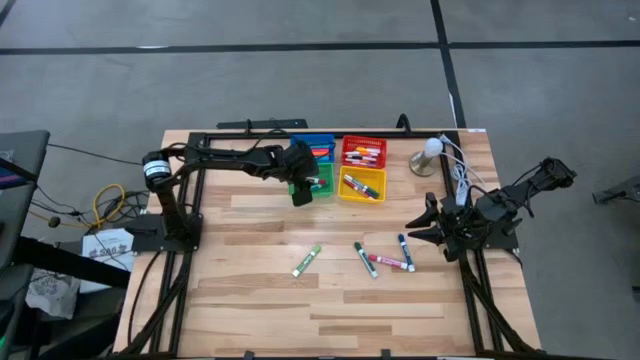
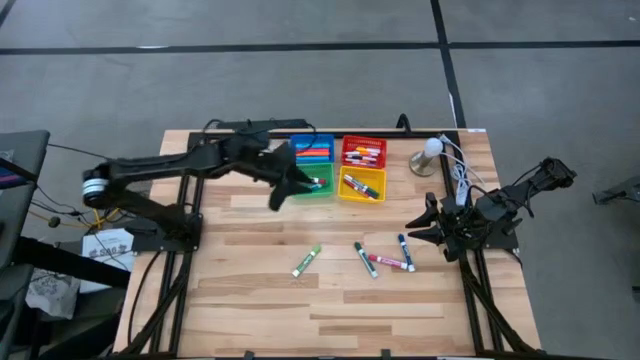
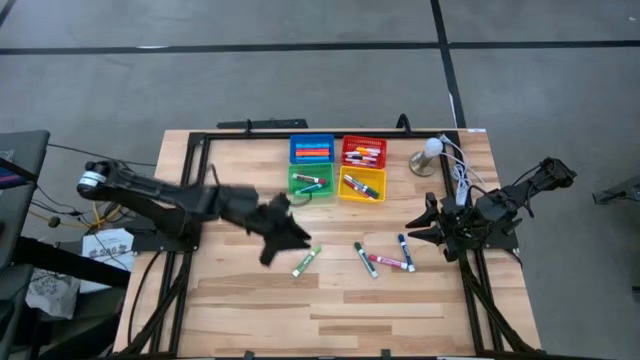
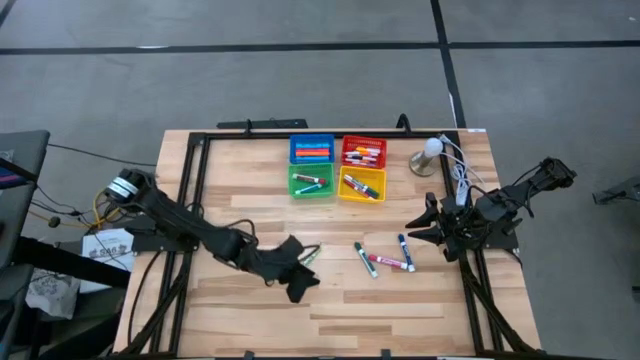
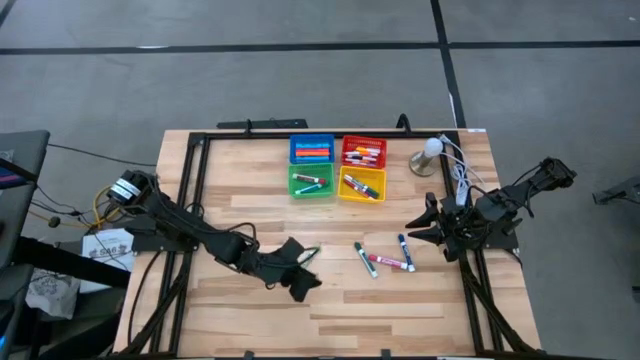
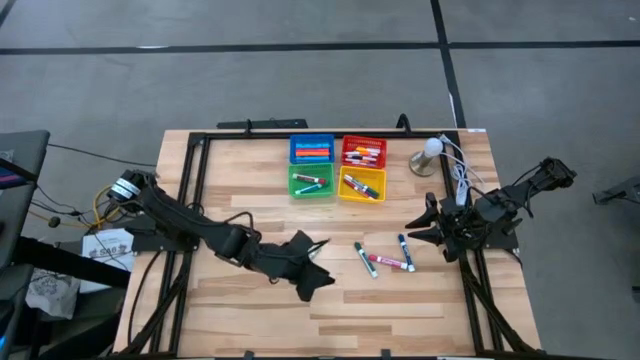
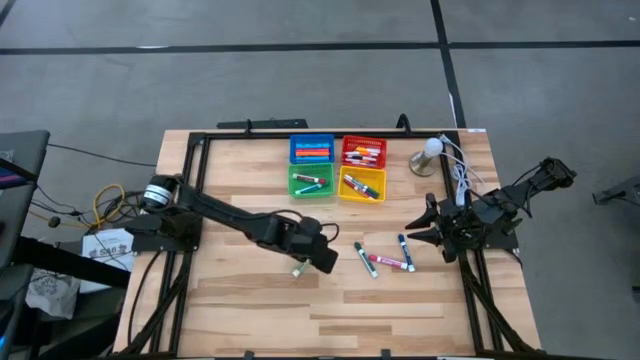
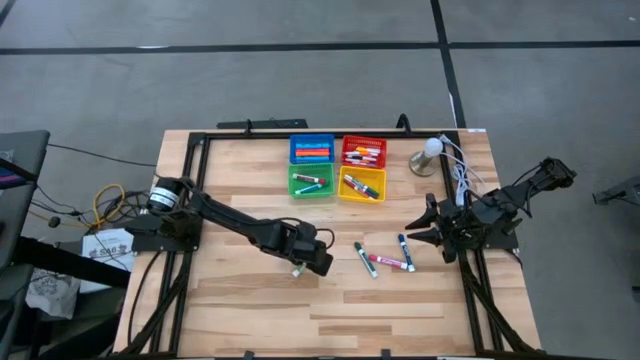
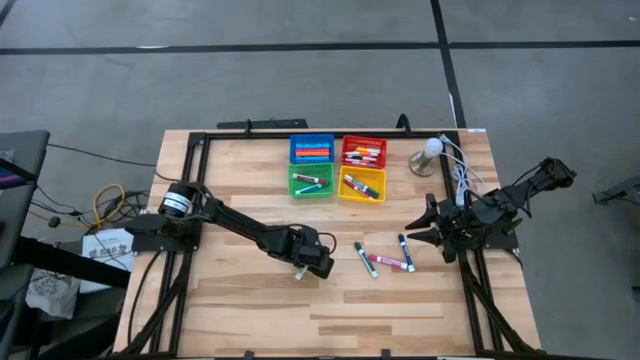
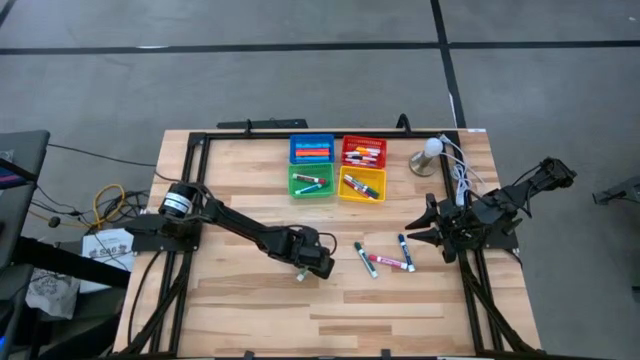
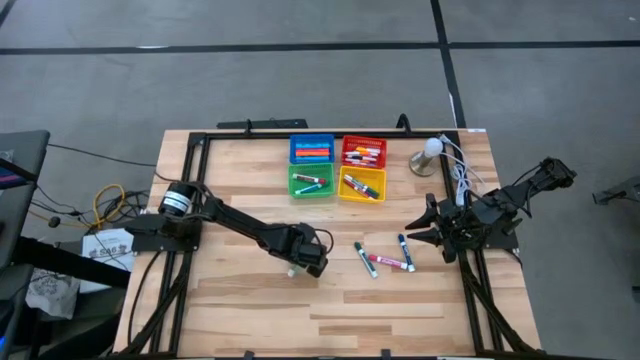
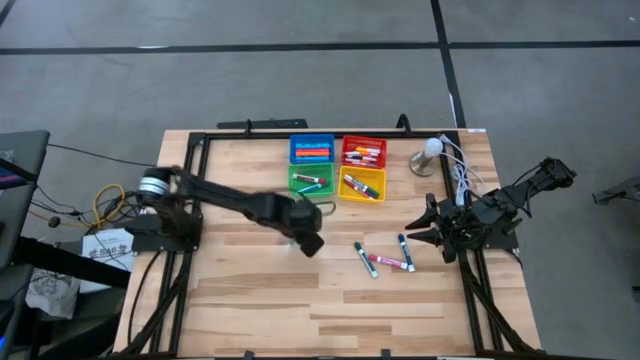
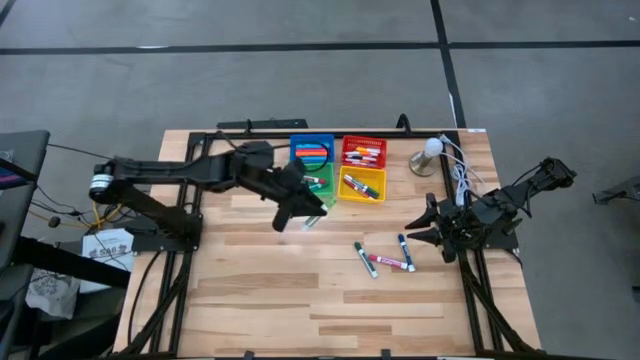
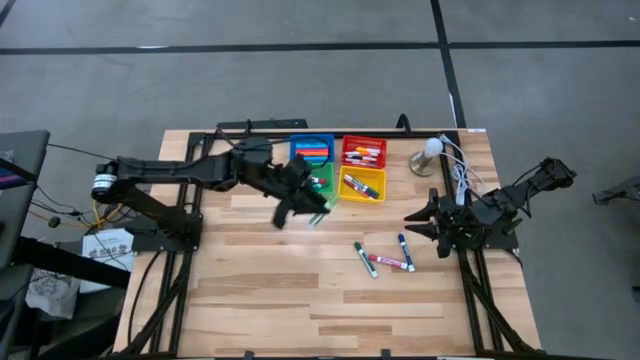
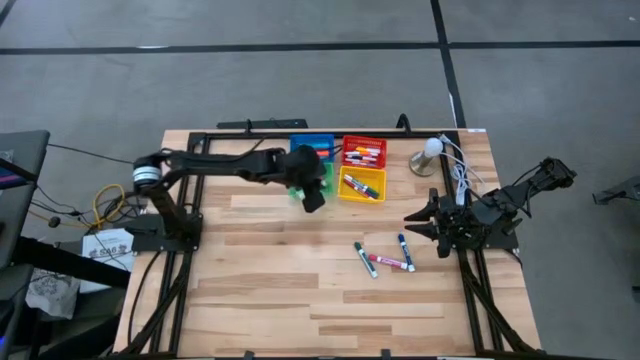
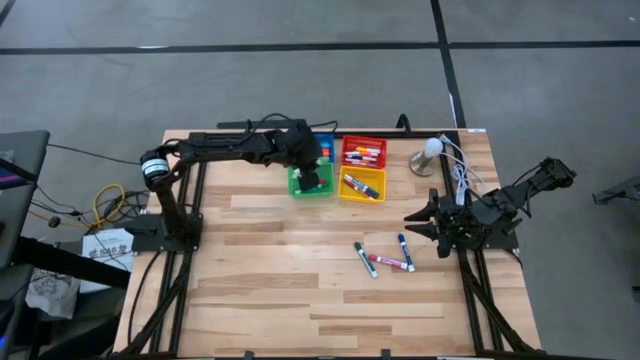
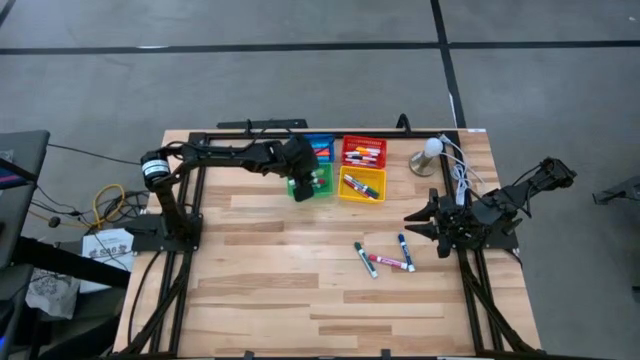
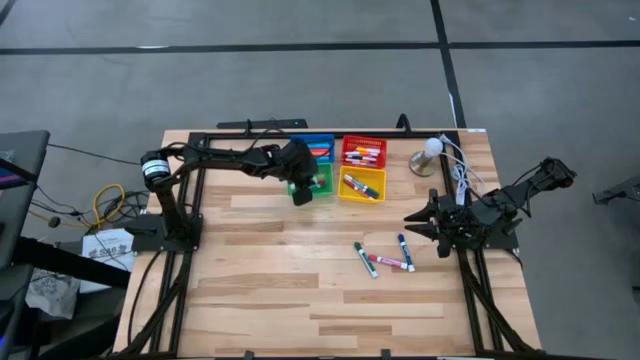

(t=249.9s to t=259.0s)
Task: Pick & Place Markers
Put the light green marker into the green bin

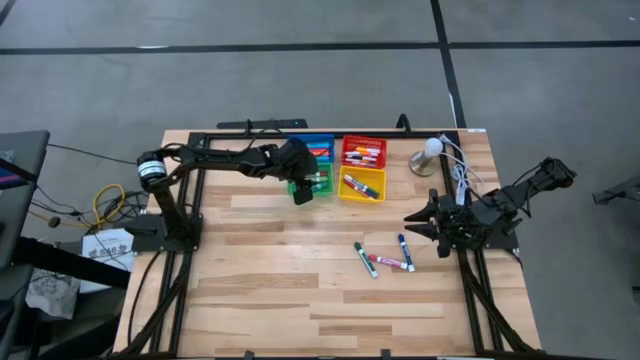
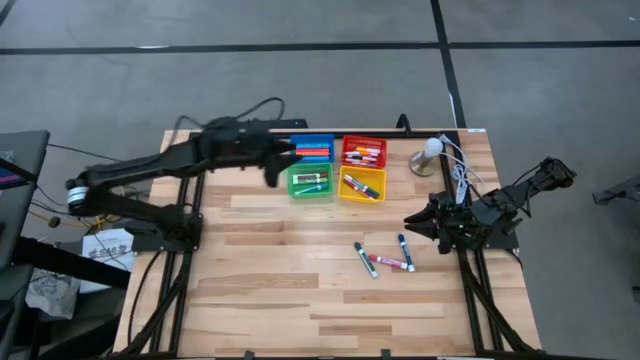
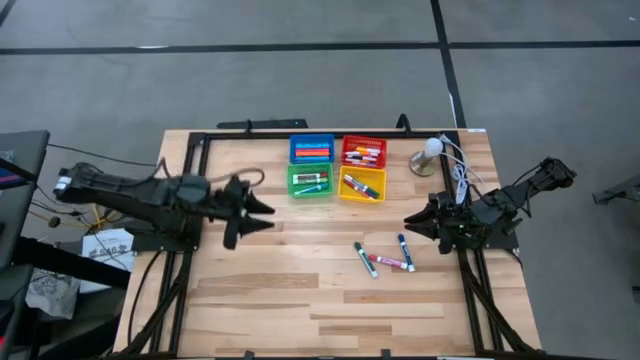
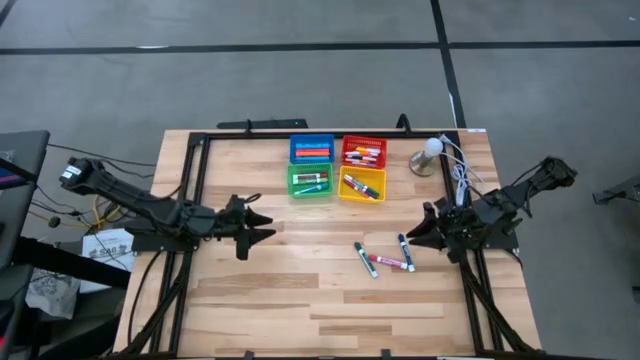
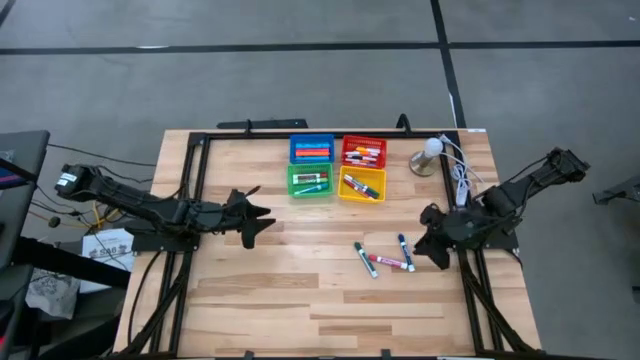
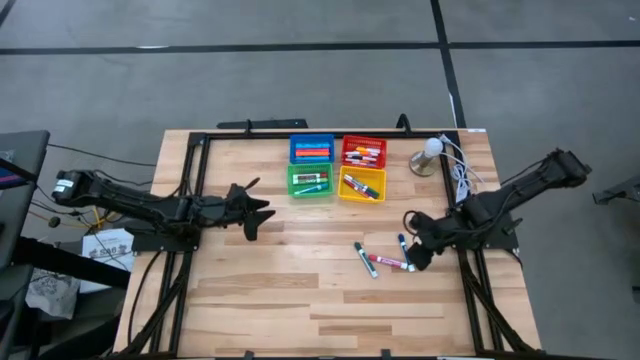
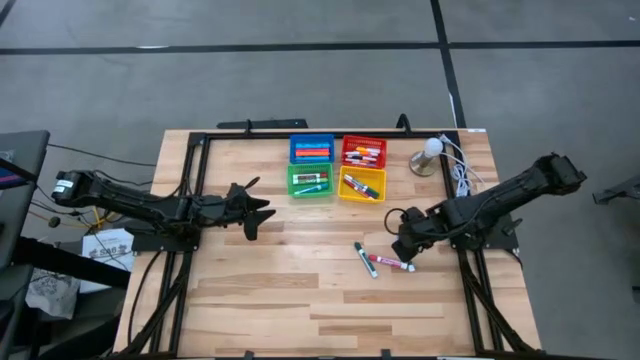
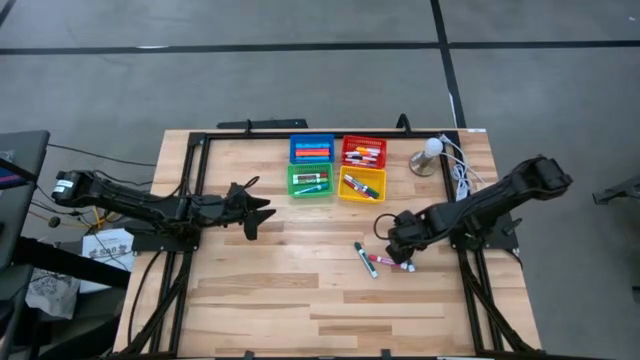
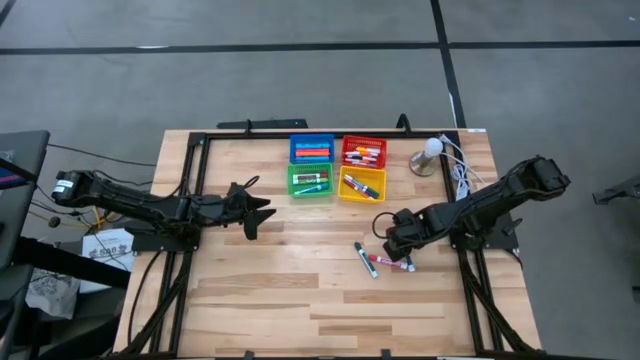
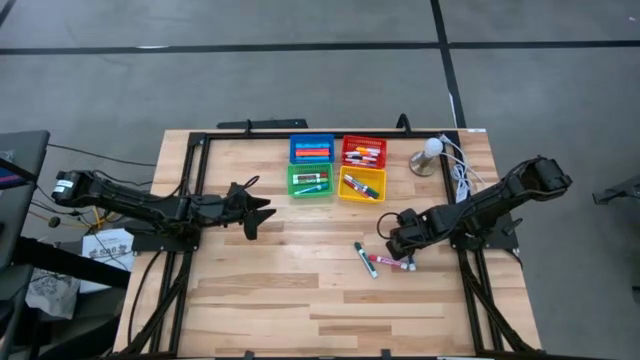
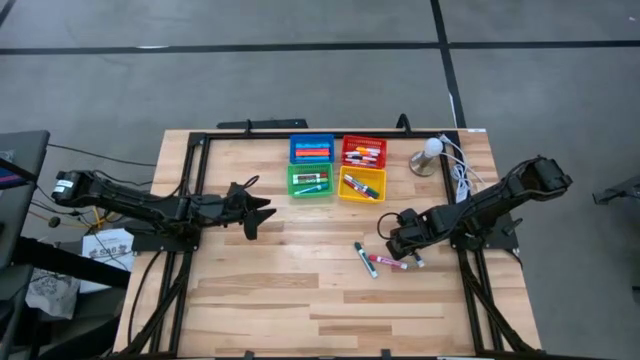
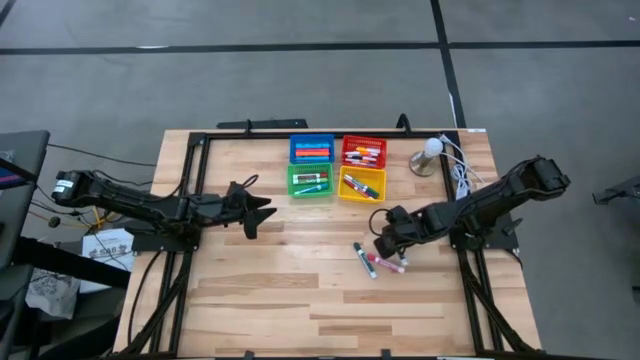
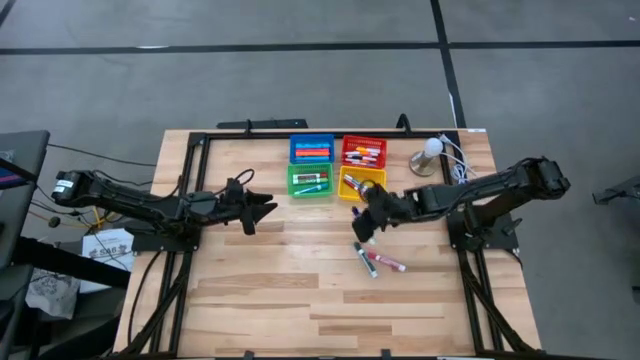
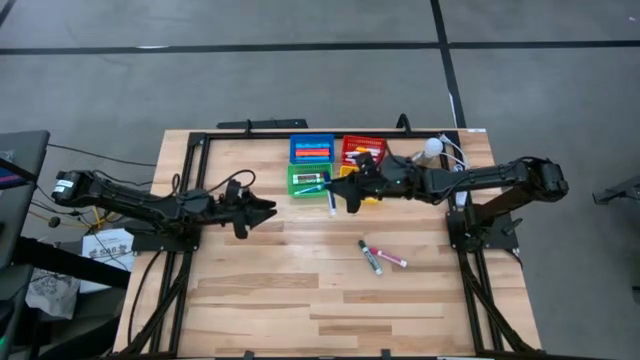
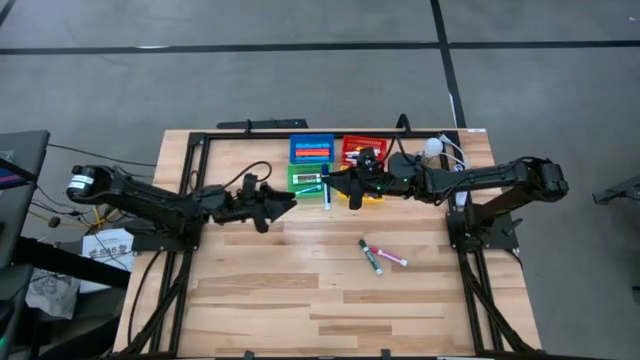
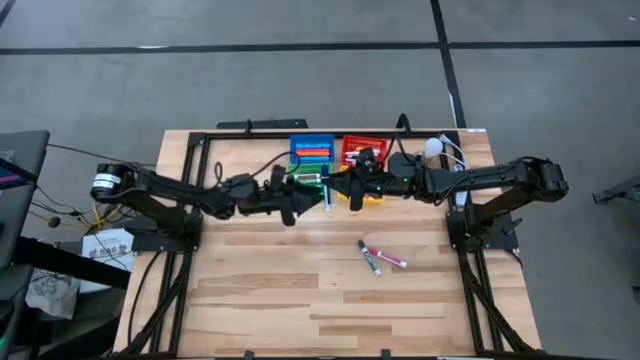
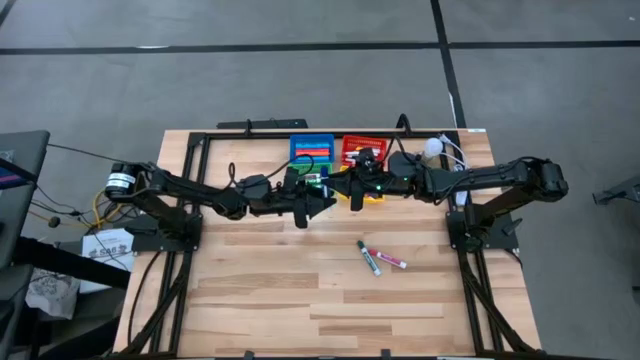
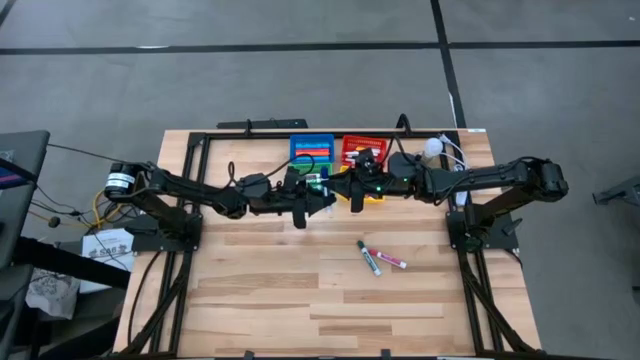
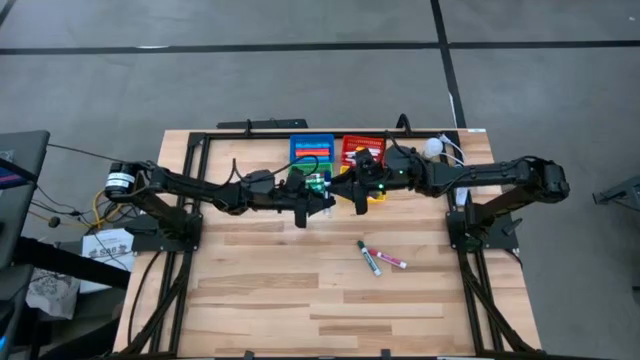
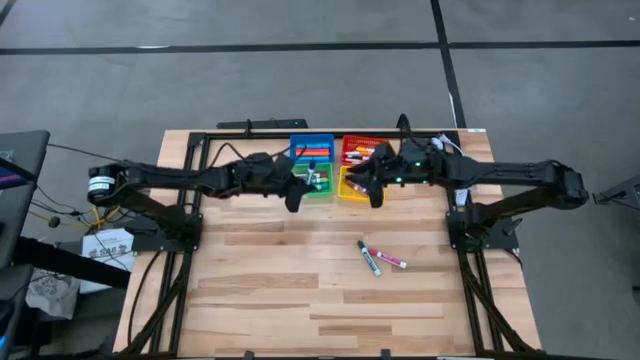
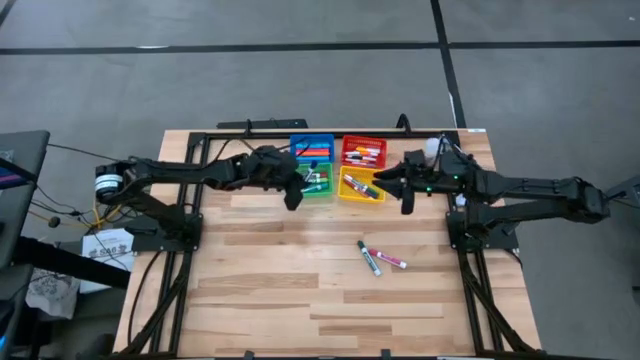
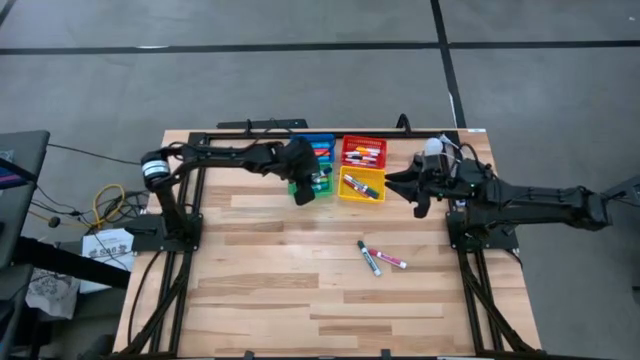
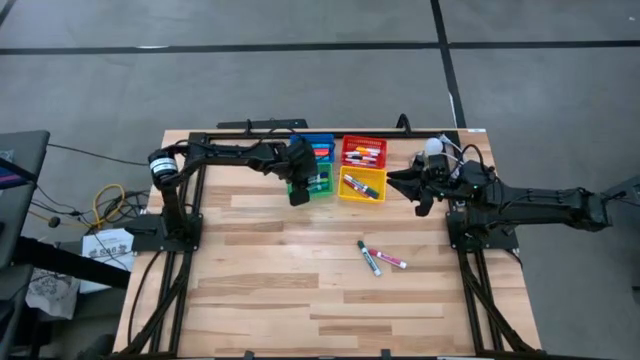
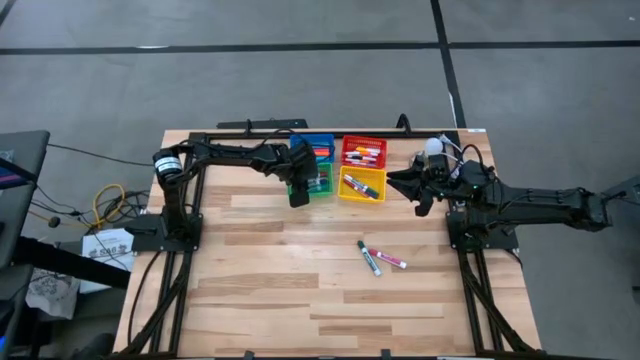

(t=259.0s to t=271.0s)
Put the blue marker into the green bin

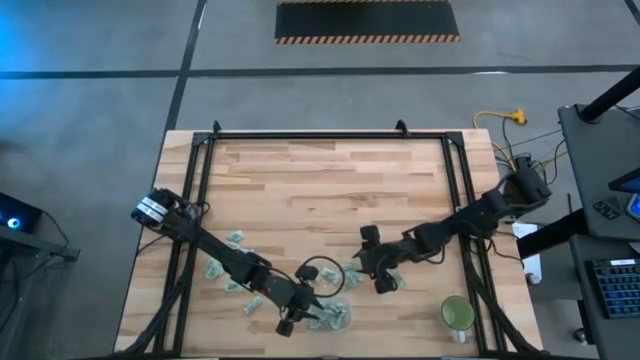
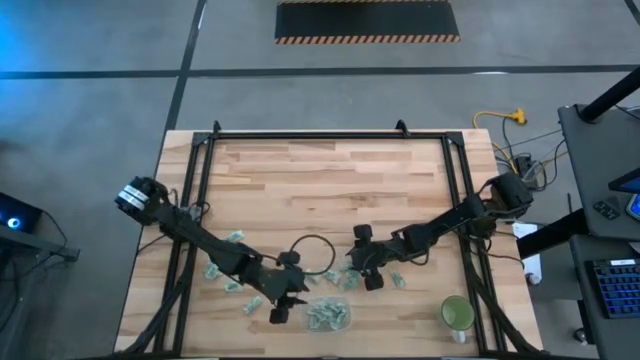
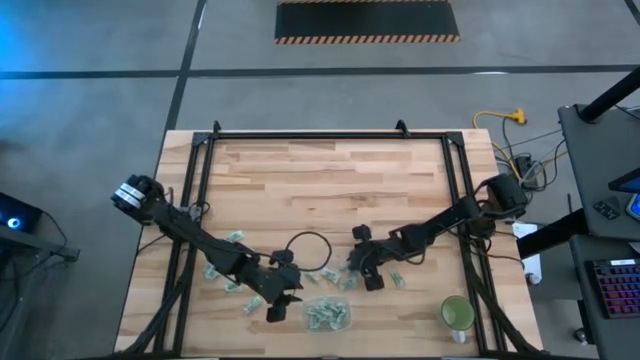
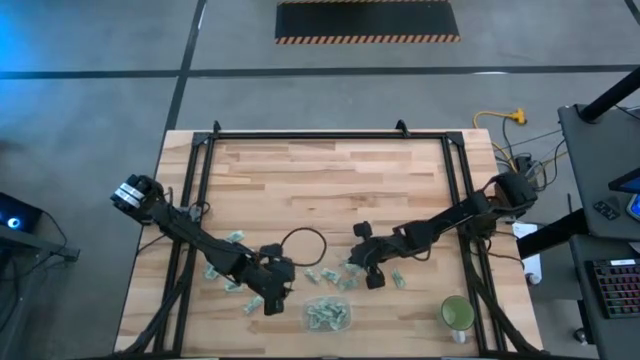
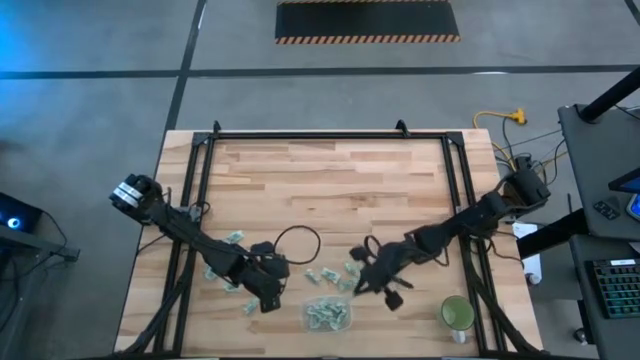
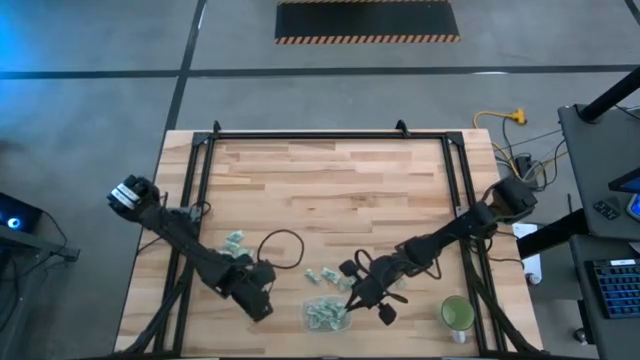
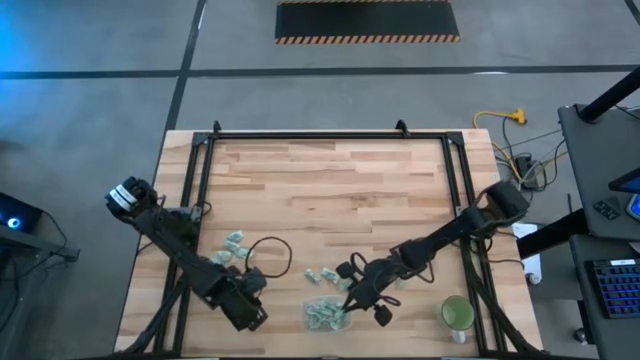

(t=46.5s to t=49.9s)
Task: Pick and place Stevia / Truvia into bins
Put the stevia packet into the transparent container
